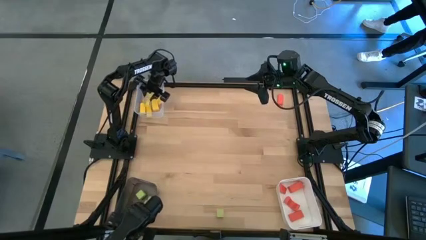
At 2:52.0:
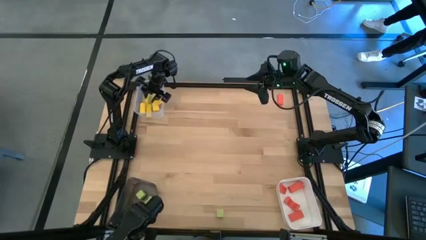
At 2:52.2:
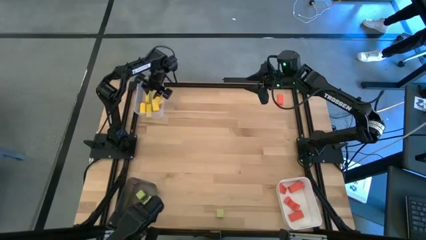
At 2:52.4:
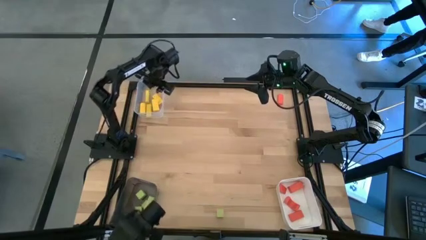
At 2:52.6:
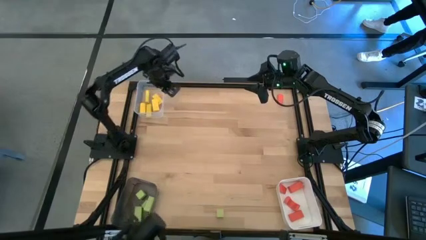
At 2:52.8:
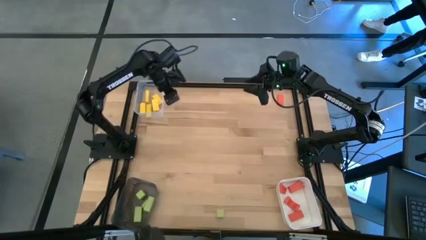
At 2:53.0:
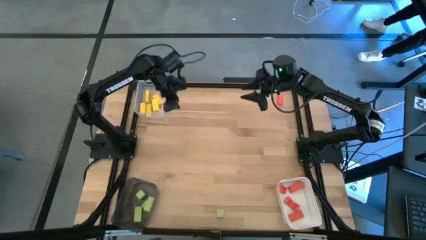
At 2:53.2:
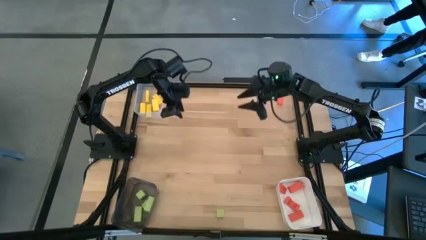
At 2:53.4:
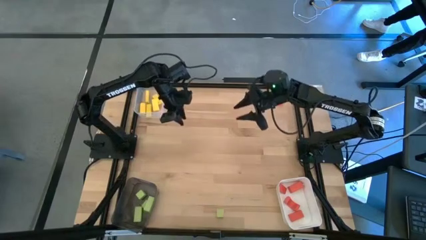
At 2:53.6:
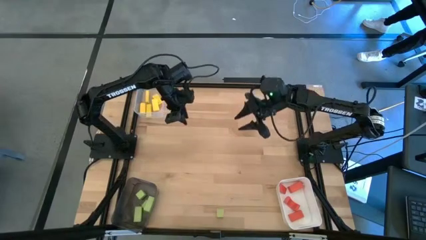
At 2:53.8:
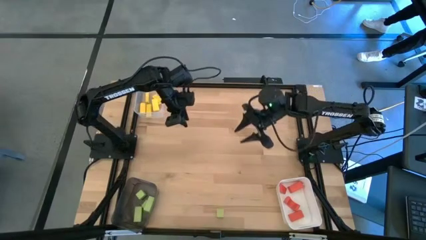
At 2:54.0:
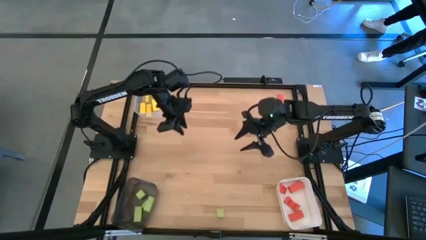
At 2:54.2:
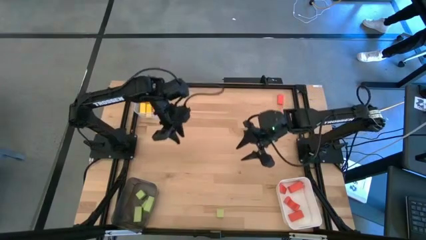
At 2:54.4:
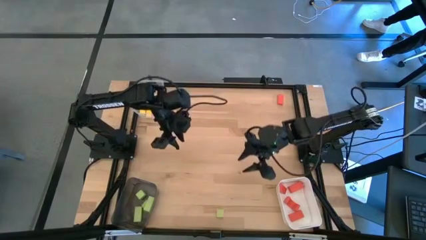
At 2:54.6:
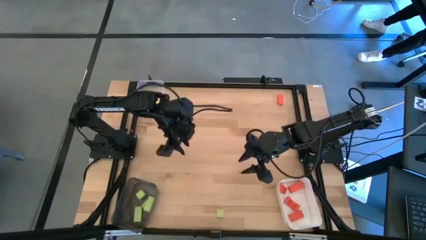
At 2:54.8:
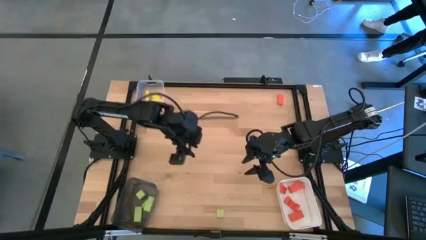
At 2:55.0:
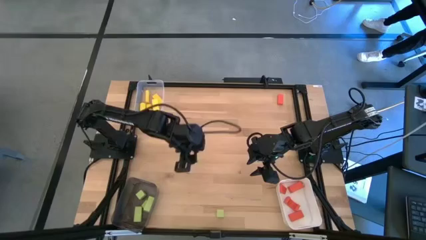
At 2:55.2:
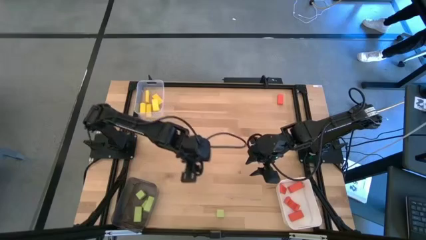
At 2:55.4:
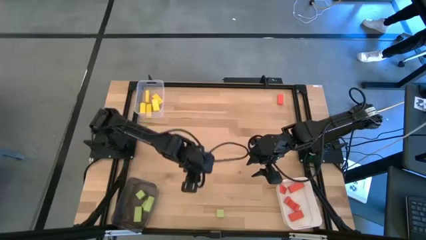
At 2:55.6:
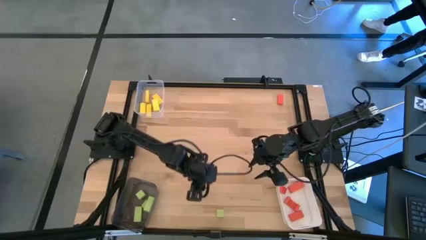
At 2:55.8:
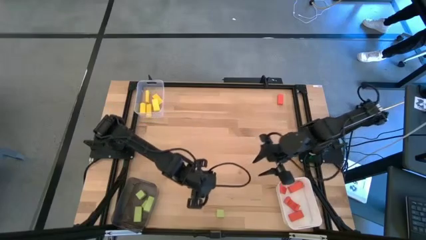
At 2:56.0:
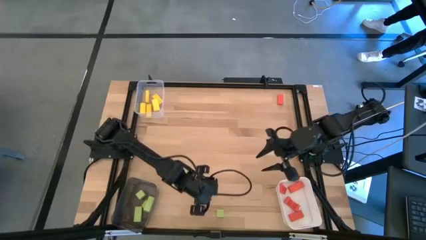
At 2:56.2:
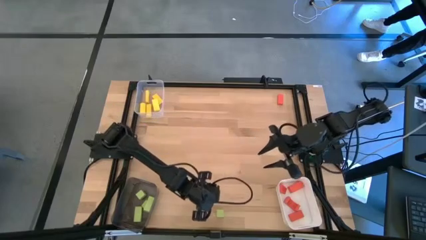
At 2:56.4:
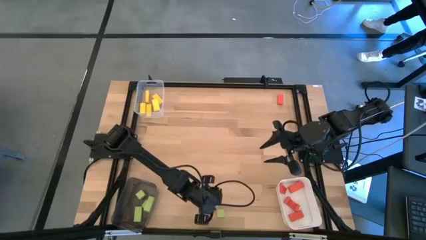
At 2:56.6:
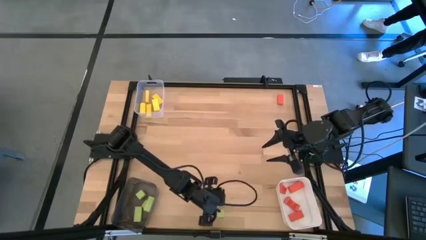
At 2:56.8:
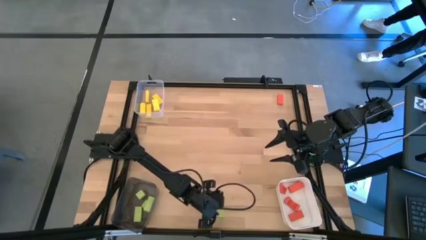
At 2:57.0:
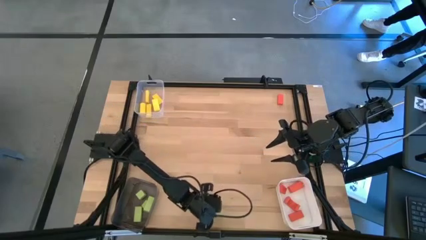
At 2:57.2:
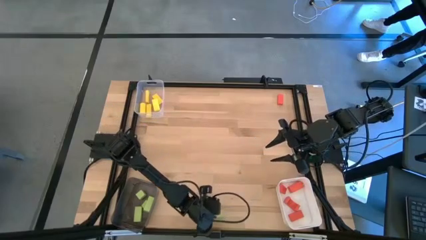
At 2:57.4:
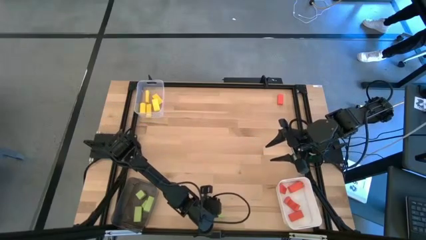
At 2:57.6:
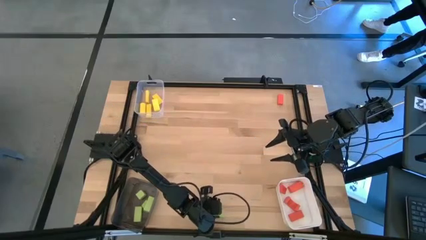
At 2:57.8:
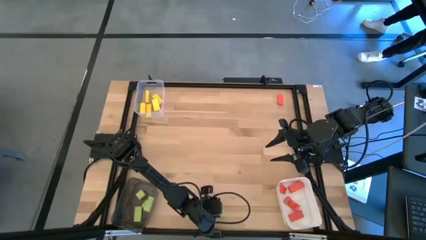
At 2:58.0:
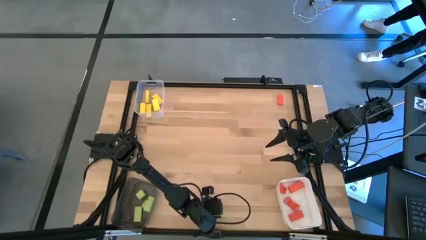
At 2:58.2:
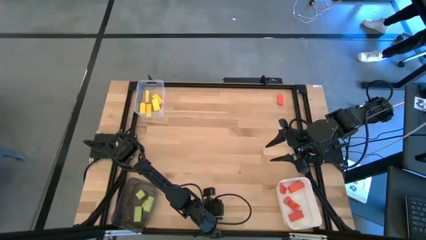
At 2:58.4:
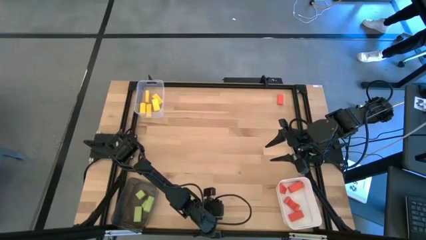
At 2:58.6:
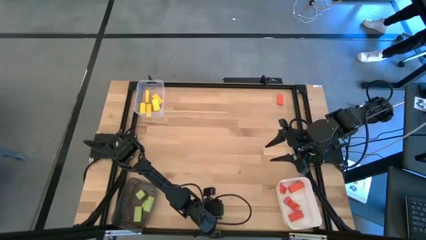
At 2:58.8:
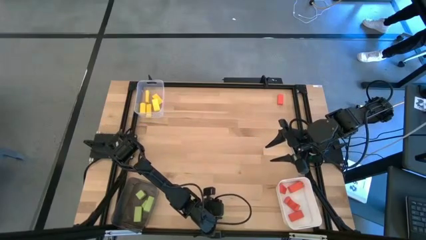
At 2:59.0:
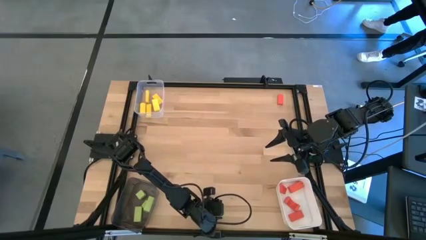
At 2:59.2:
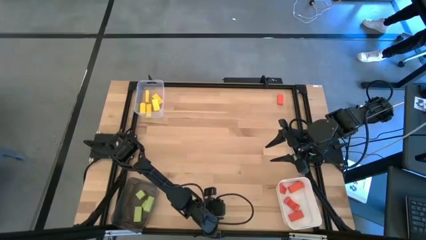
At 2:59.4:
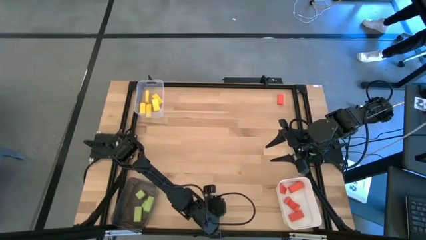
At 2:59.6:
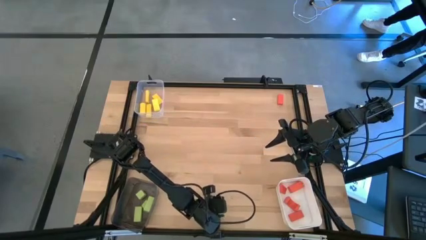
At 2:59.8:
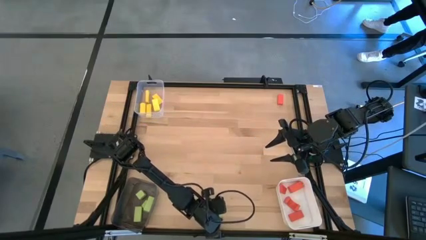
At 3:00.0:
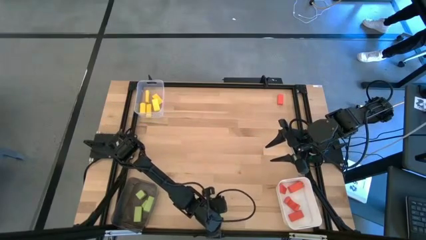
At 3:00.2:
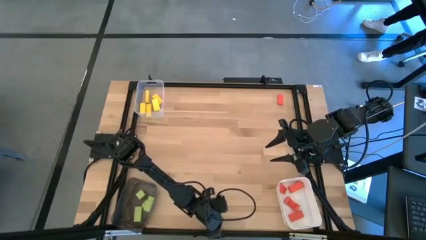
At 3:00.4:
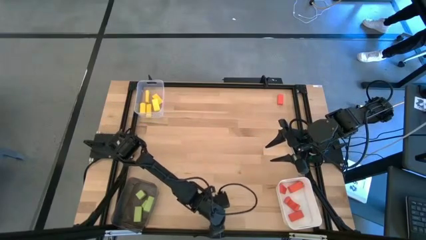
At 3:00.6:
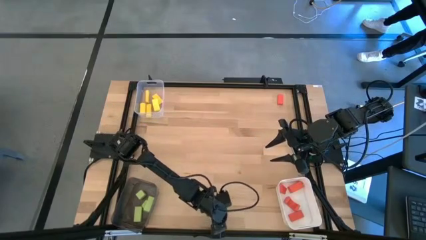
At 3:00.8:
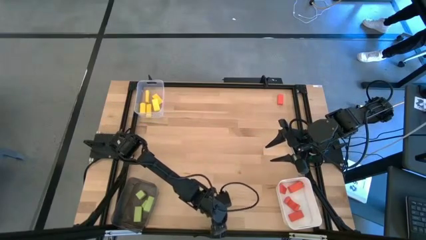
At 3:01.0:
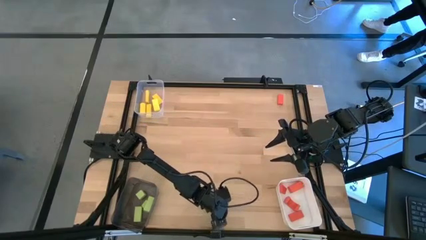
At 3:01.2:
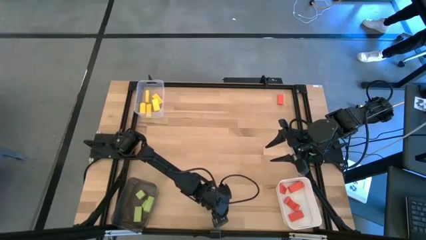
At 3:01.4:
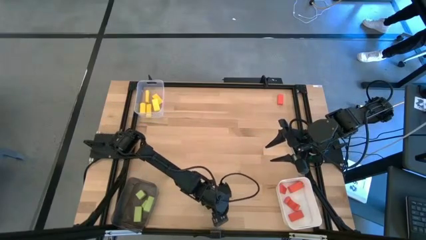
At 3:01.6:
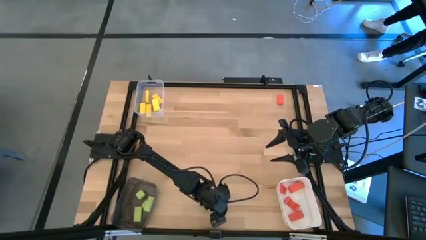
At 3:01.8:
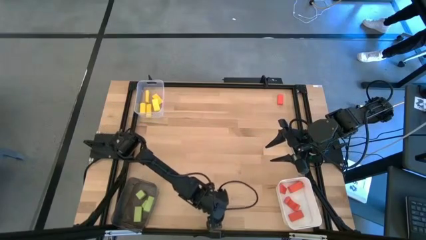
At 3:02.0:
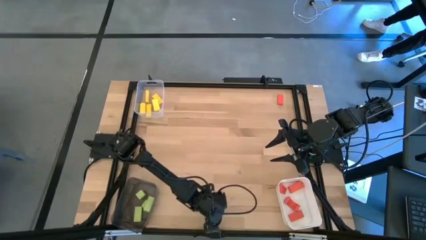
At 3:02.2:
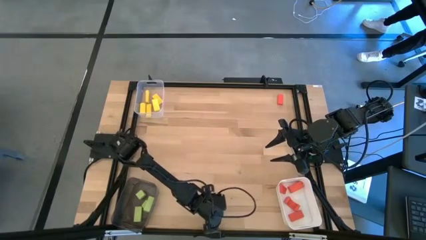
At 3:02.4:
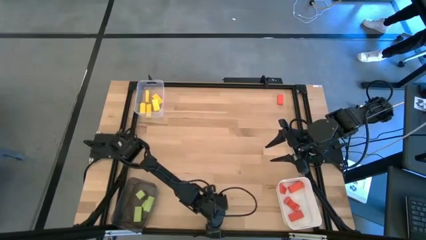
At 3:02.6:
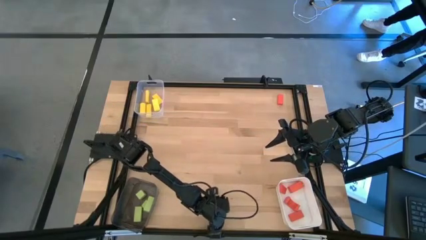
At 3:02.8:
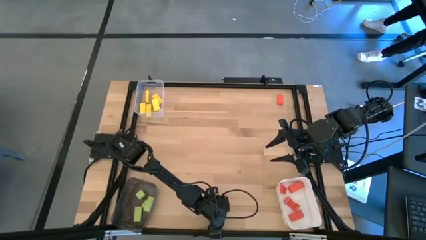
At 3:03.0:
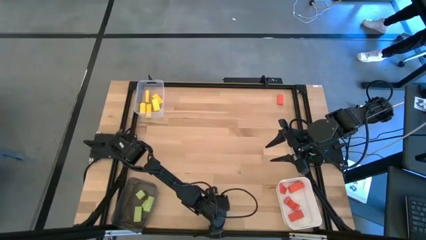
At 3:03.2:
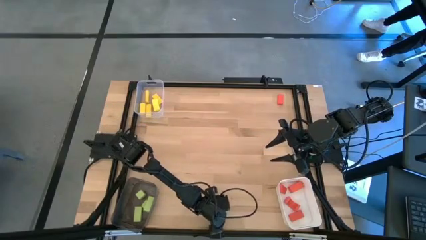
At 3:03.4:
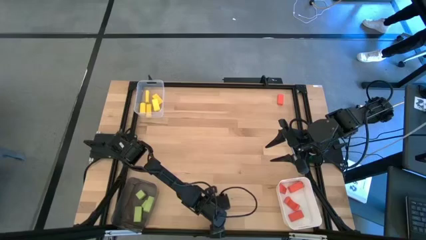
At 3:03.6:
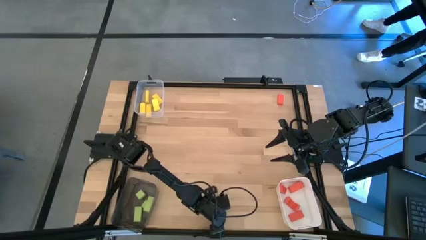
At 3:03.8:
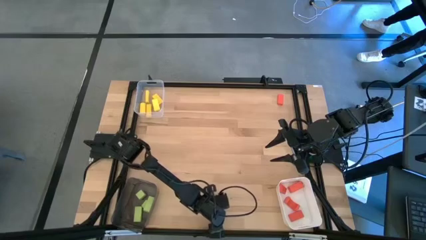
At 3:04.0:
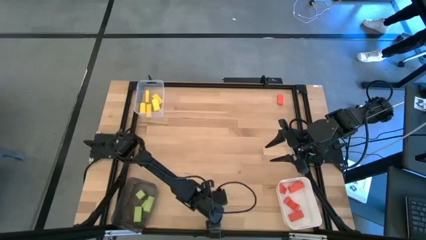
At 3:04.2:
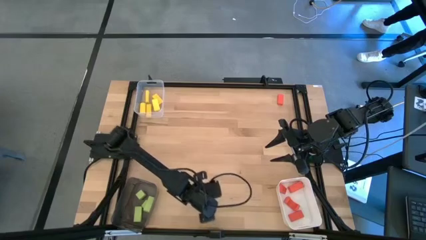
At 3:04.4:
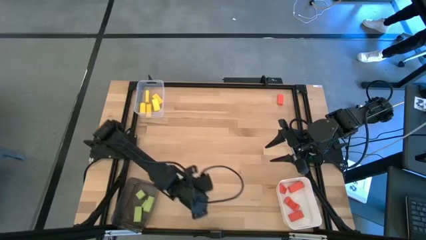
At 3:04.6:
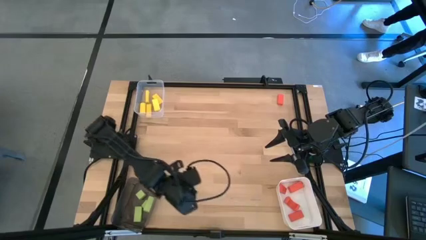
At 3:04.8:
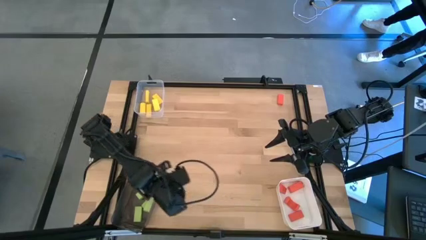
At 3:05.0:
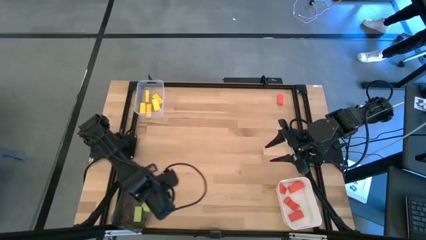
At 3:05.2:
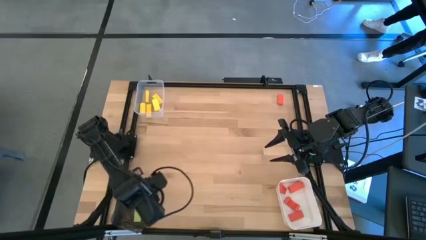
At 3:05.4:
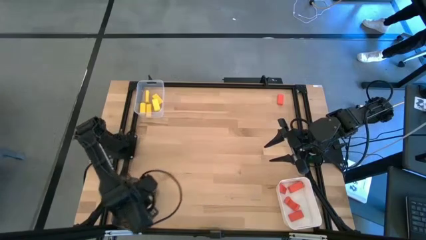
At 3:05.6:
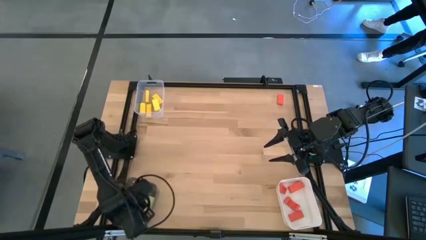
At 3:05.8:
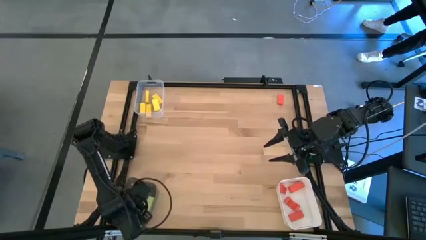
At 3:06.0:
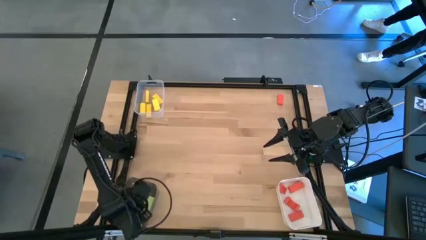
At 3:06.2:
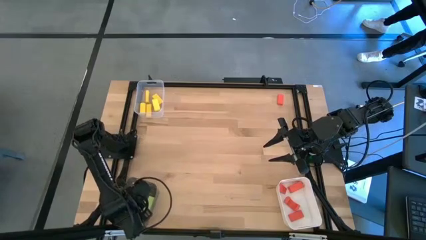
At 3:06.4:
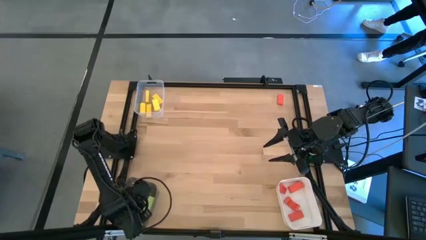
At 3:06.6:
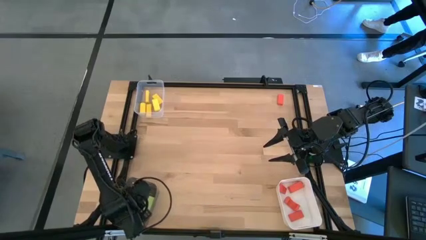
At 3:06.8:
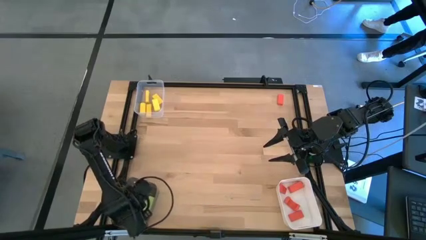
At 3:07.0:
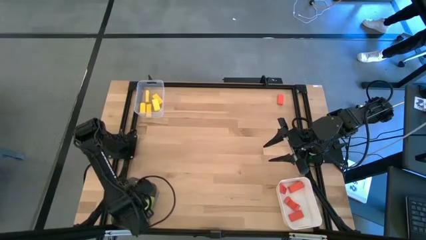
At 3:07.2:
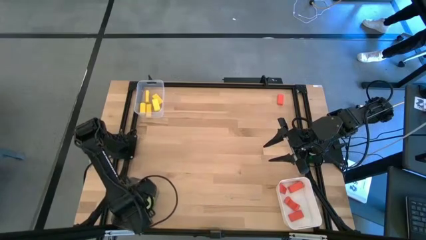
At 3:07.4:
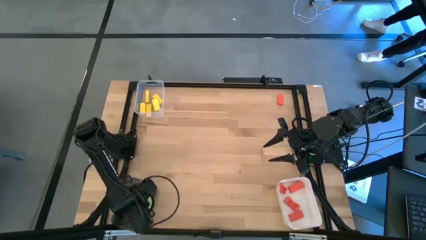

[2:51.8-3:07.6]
Task: Sort & place blocks by color
Put the green block into the black bin
